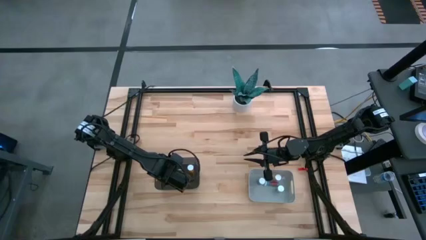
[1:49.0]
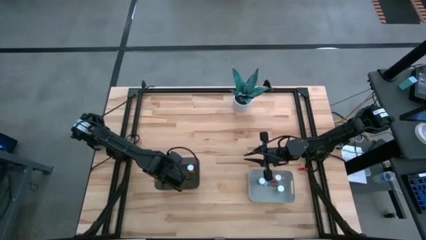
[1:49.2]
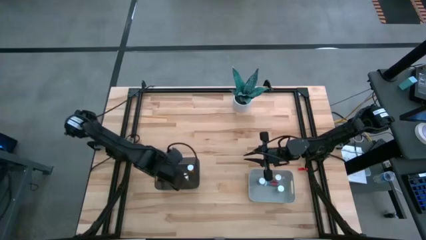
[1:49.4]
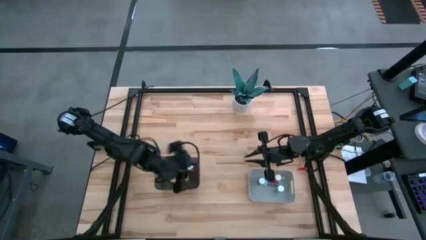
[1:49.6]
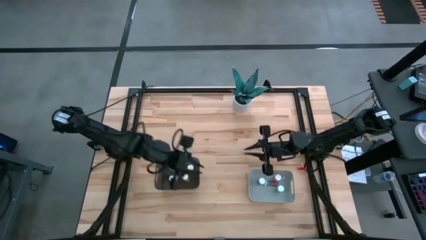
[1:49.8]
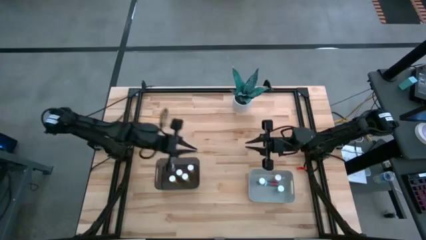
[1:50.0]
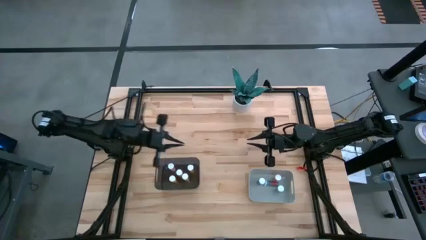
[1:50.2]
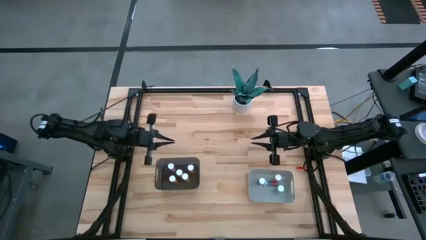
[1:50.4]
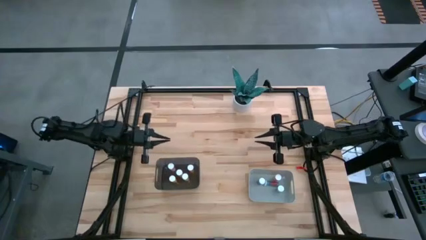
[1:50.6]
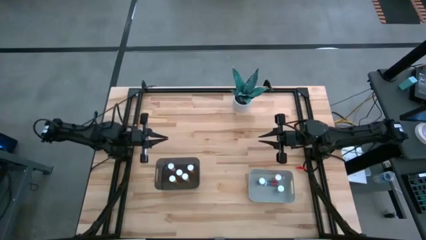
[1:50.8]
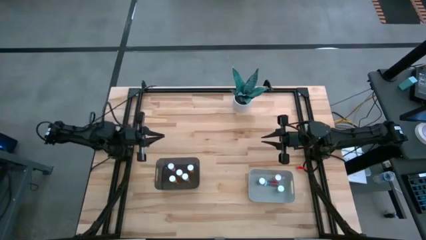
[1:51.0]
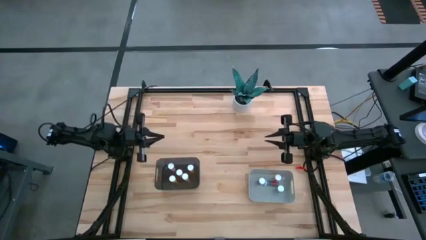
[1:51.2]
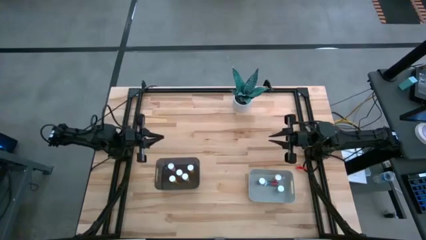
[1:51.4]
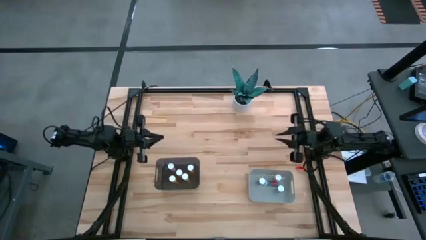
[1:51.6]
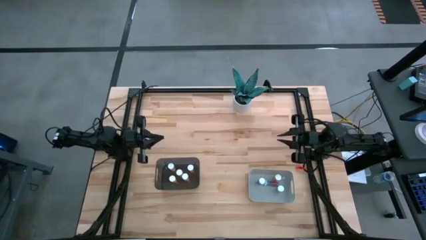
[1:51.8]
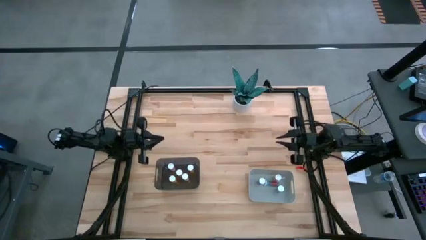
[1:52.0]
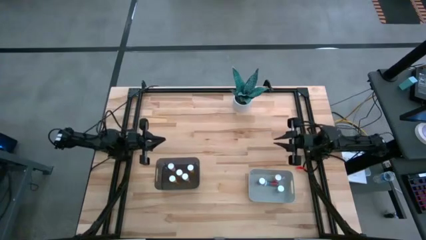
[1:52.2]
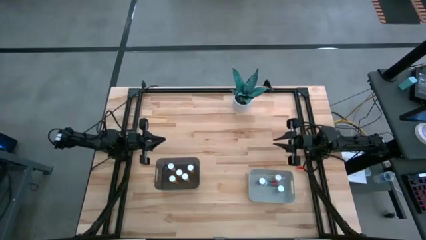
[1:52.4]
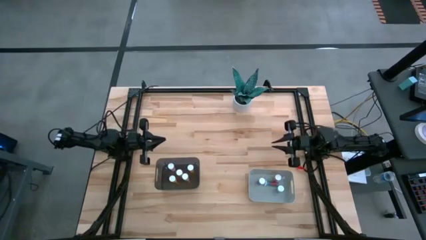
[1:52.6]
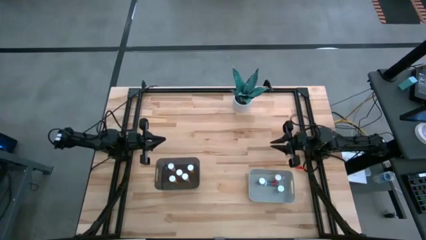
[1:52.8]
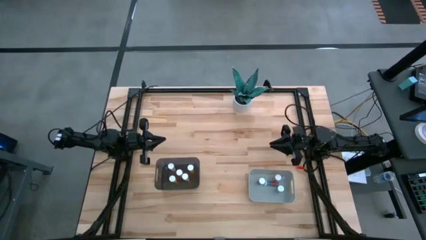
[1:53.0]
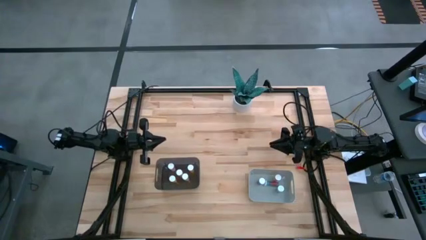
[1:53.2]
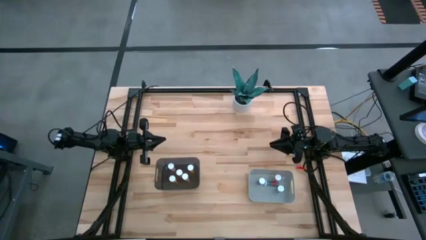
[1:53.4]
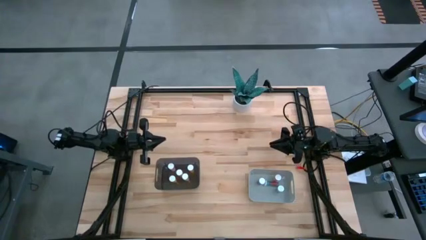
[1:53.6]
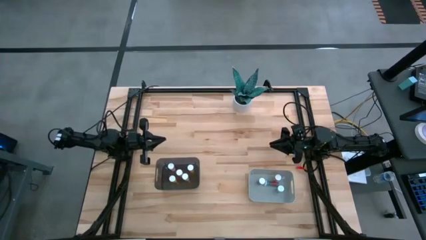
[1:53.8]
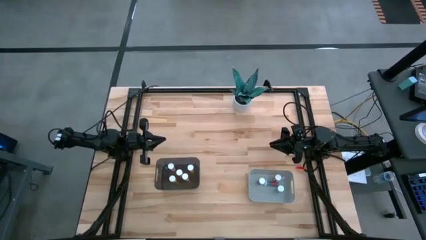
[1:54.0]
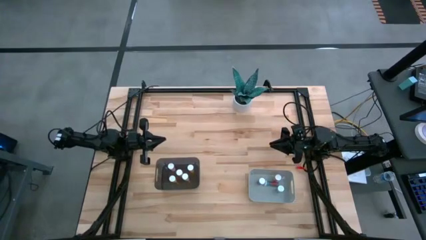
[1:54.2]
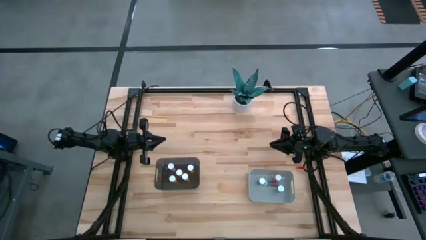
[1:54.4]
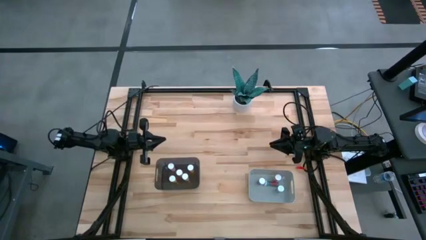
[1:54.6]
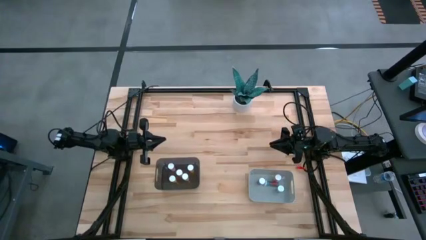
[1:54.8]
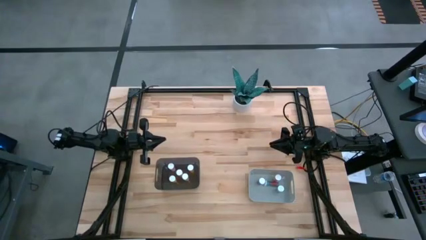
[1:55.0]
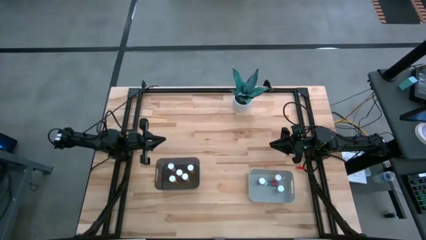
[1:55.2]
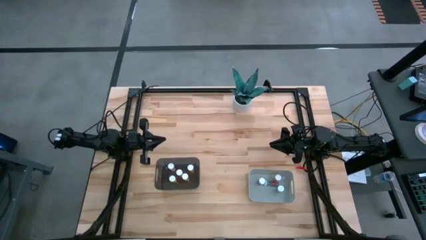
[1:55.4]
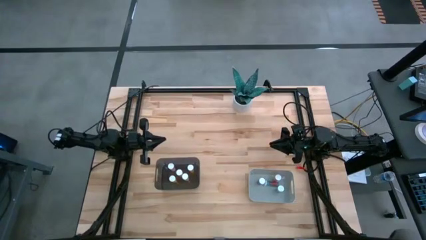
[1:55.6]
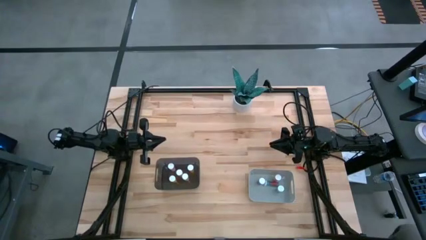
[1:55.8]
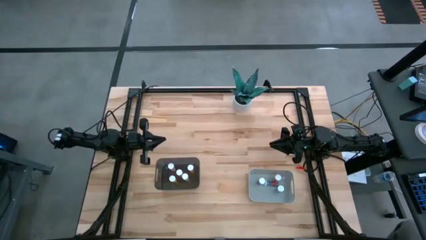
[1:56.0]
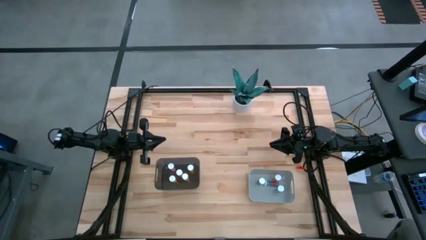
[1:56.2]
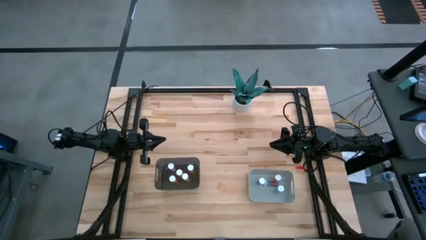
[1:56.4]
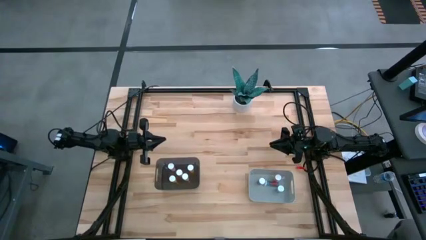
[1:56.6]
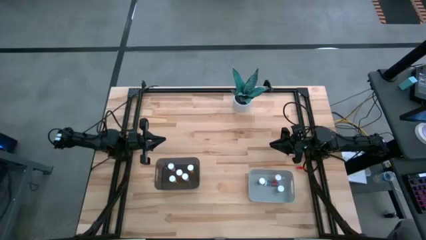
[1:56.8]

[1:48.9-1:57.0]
Task: Pick and place medicine bottles into bin by pill shape (circle, oval)
Return to Home Position

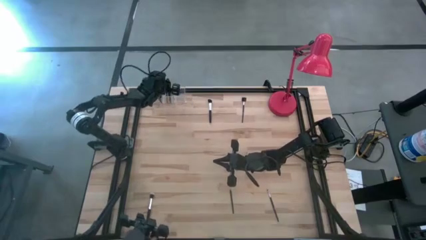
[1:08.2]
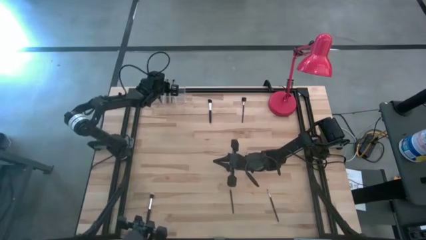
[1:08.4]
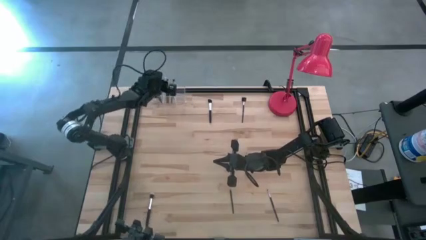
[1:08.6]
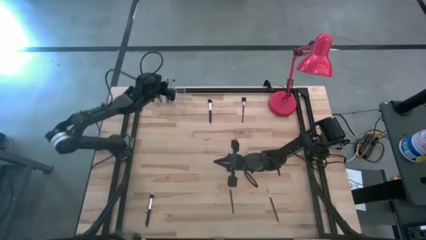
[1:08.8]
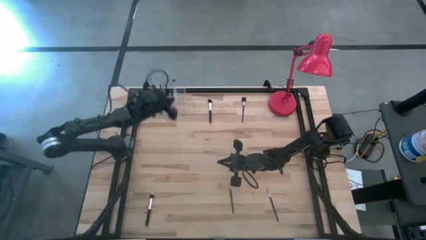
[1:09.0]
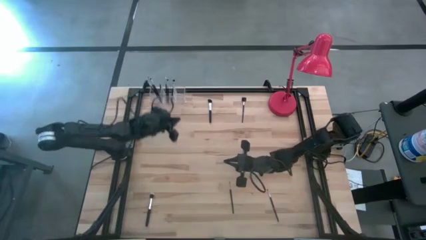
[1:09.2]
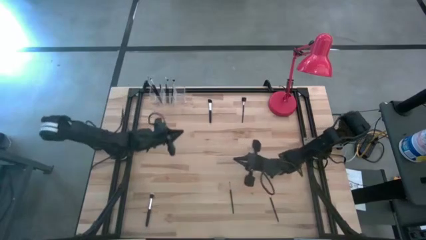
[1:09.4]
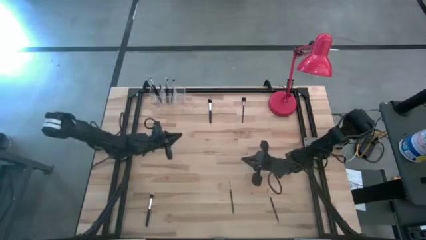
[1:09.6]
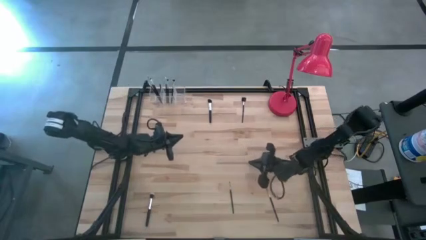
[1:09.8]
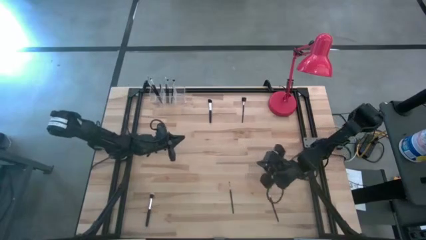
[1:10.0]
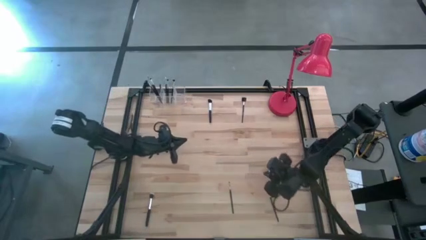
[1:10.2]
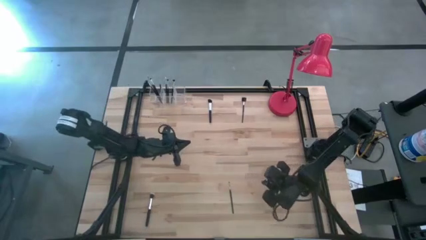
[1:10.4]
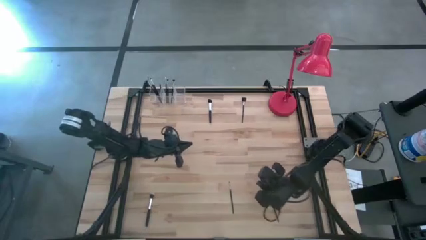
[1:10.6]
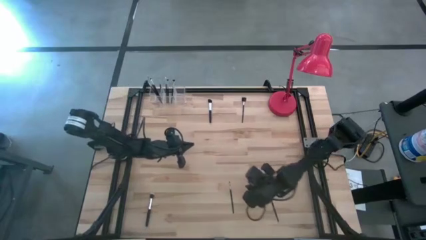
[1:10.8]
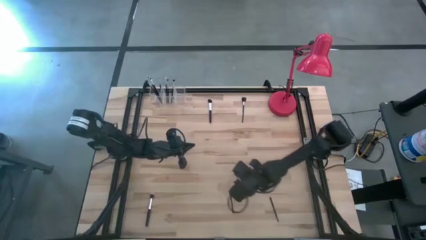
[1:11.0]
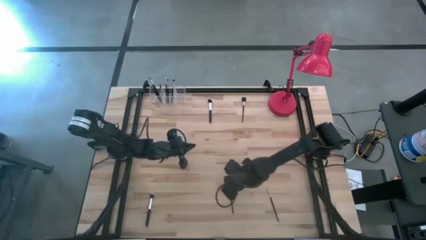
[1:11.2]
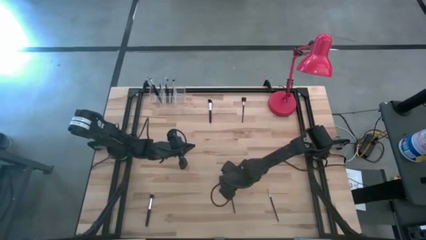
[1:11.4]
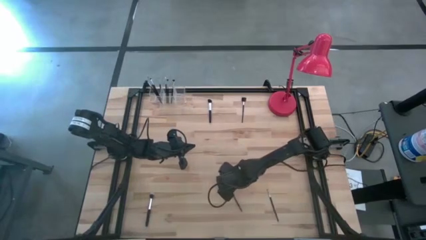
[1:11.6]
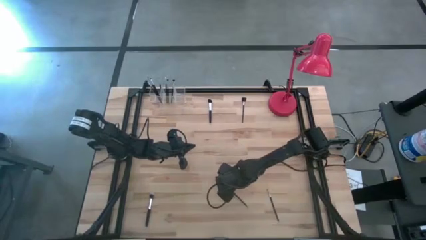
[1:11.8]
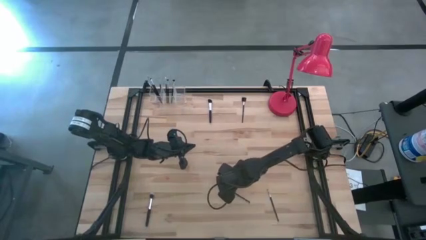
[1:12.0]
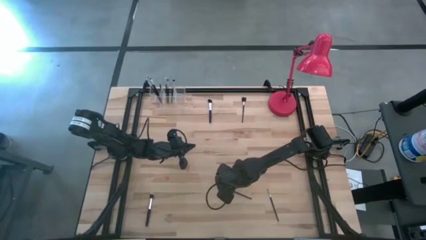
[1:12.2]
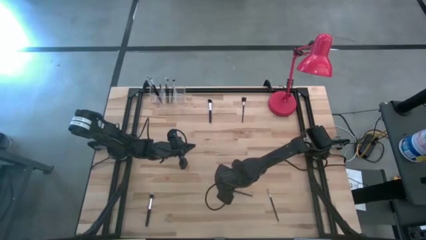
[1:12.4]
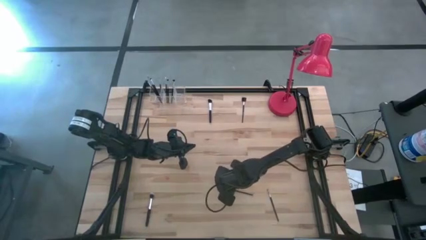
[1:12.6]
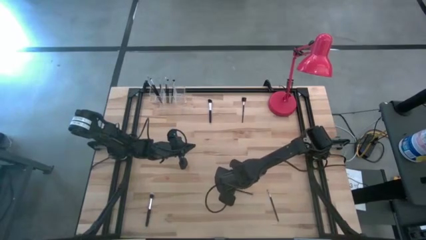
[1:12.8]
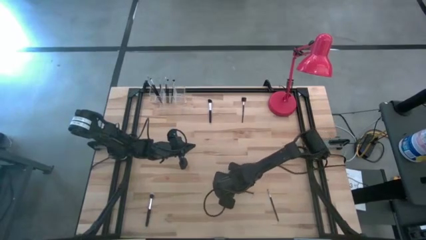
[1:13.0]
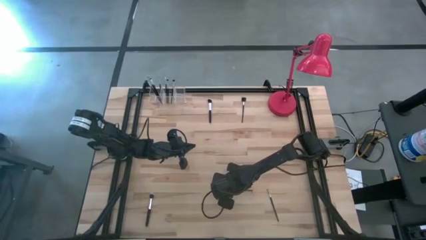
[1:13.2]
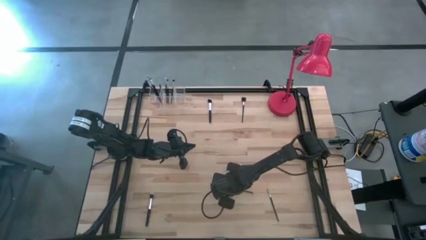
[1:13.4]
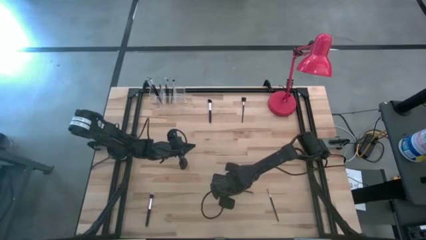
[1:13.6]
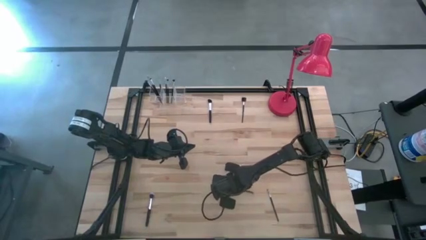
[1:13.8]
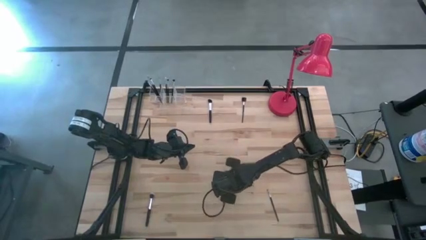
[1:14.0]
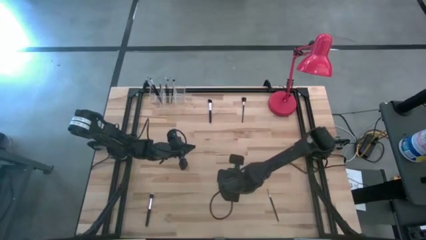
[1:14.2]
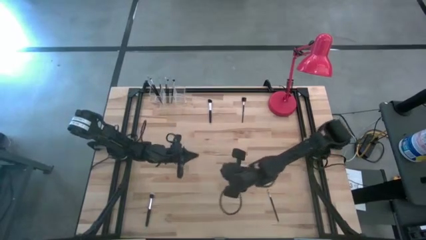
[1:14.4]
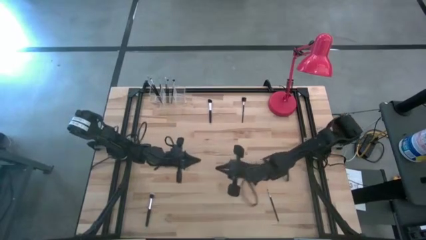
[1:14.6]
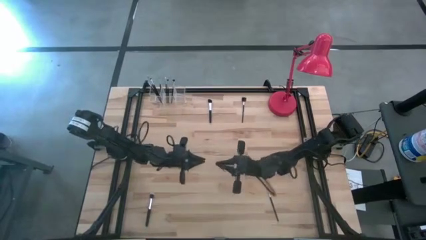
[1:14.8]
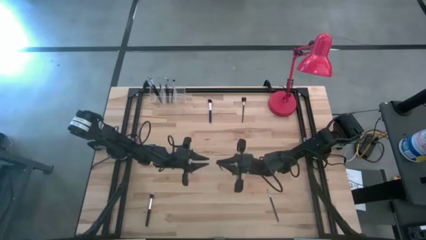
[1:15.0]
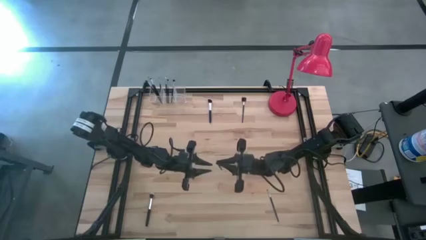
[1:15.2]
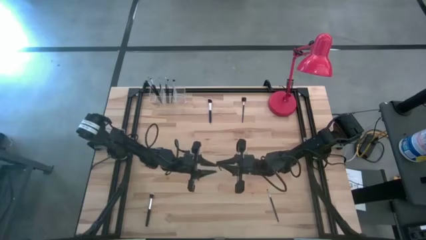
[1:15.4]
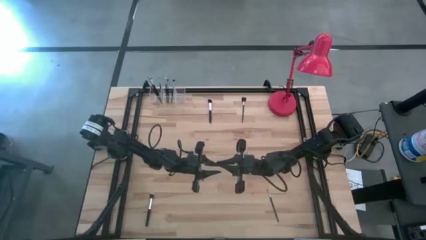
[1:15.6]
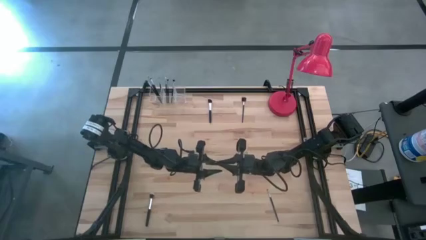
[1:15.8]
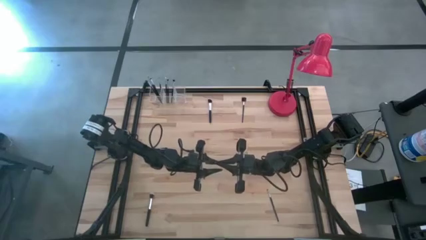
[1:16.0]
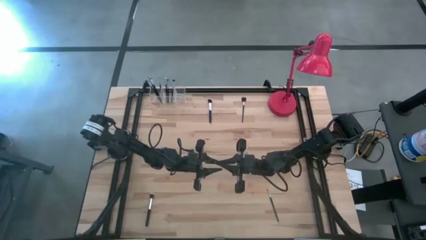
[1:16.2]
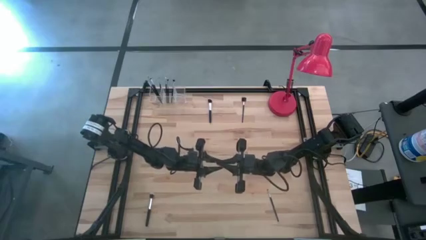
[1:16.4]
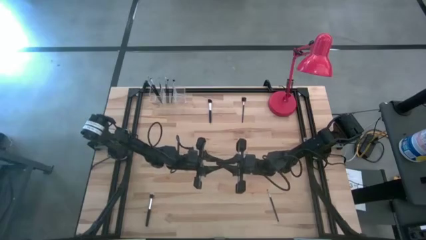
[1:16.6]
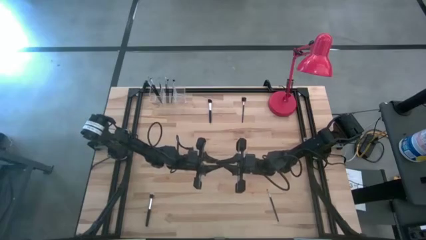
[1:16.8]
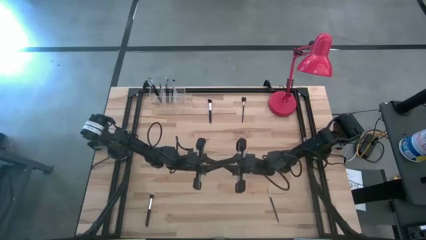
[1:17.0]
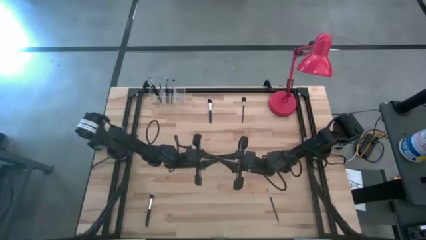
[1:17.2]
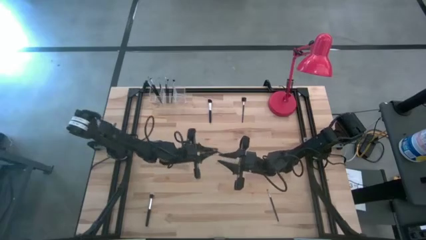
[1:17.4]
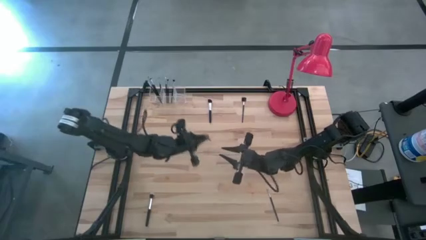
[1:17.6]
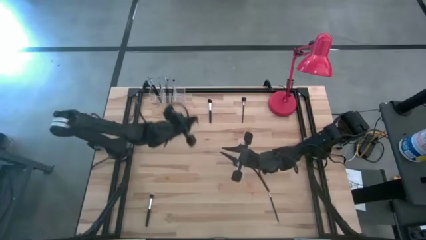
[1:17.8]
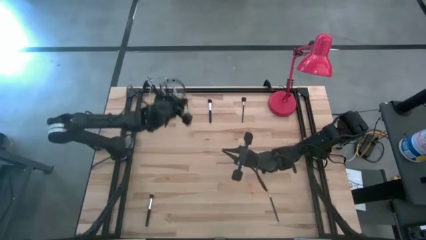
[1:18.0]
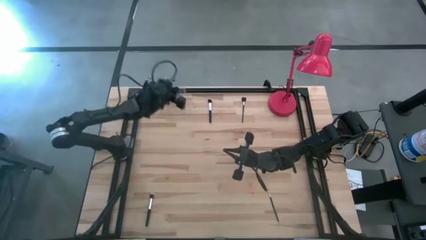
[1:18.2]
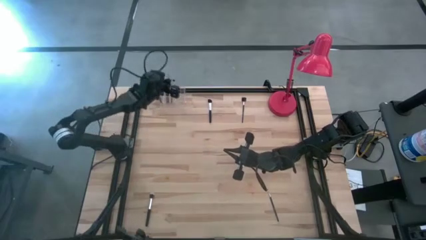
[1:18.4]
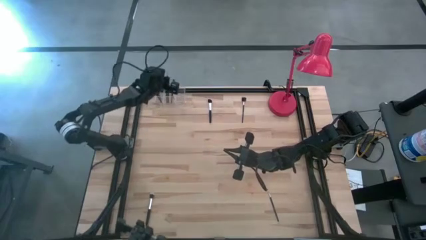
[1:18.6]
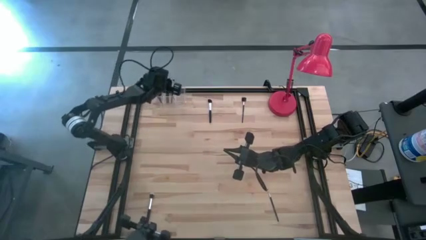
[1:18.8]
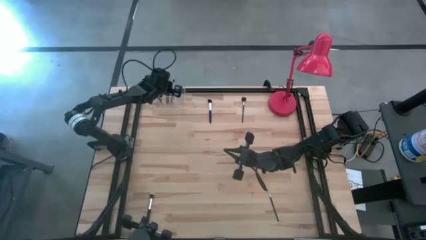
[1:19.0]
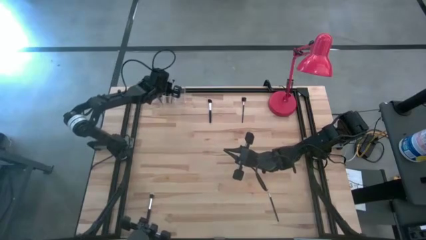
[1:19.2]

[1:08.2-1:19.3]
Task: Pick & Place Makeup Brushes
Put the eyeshadow brush into the transparent organizer
